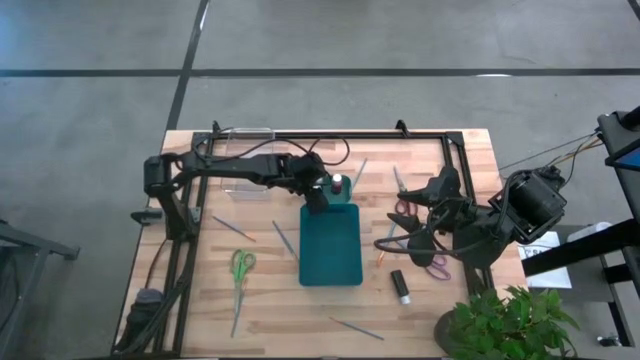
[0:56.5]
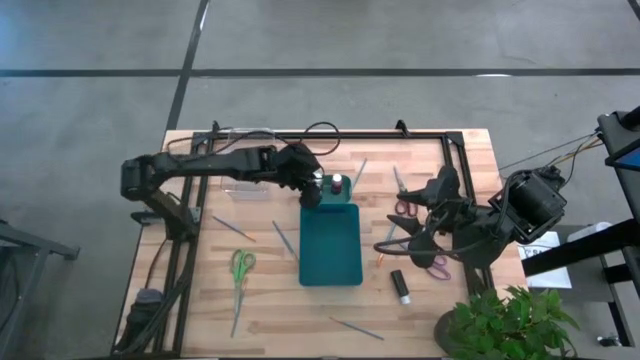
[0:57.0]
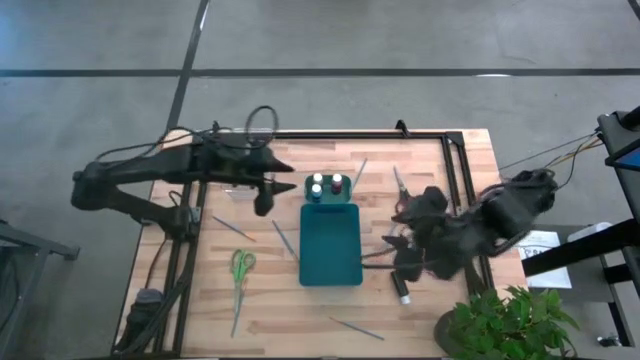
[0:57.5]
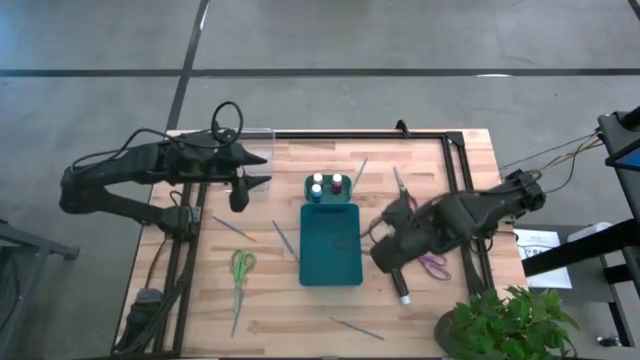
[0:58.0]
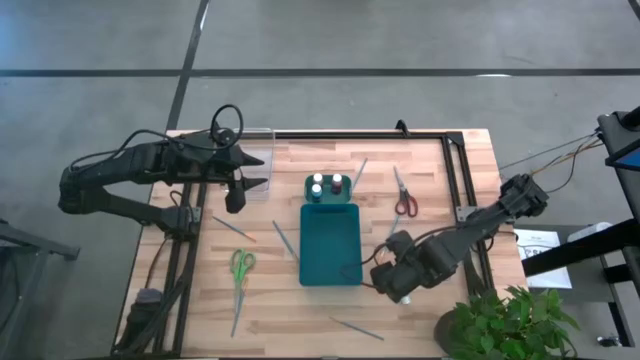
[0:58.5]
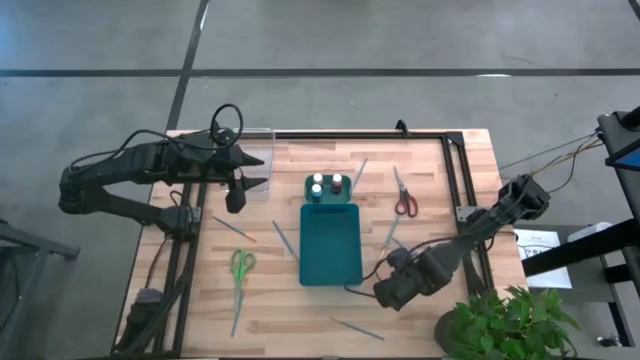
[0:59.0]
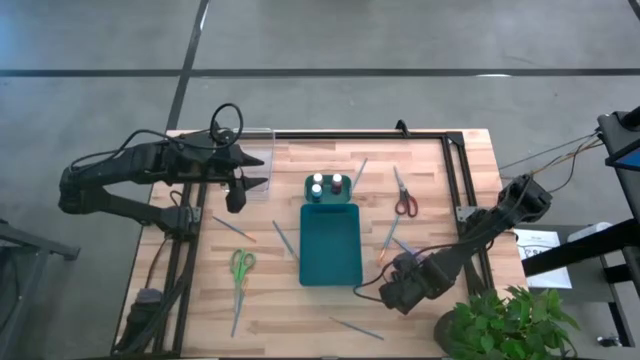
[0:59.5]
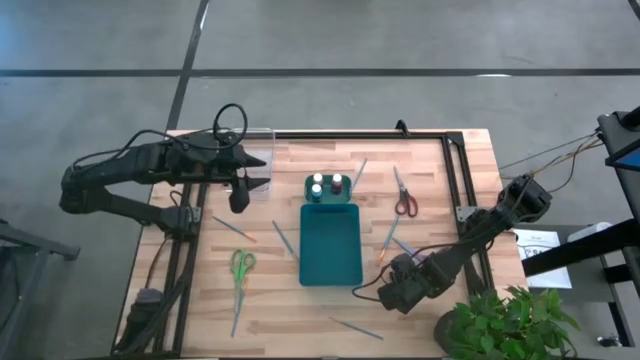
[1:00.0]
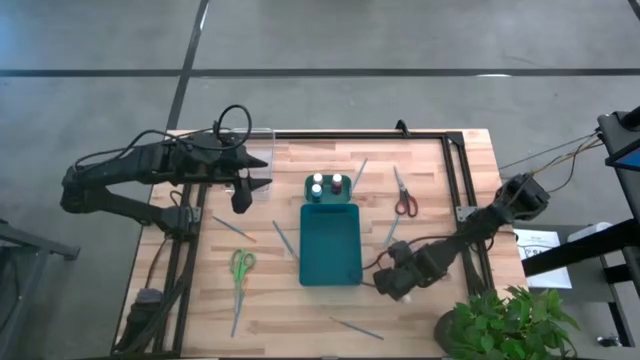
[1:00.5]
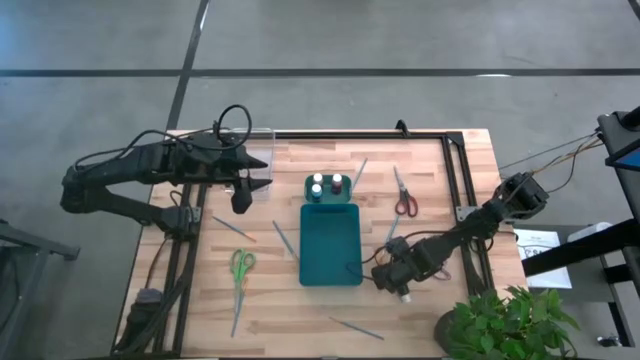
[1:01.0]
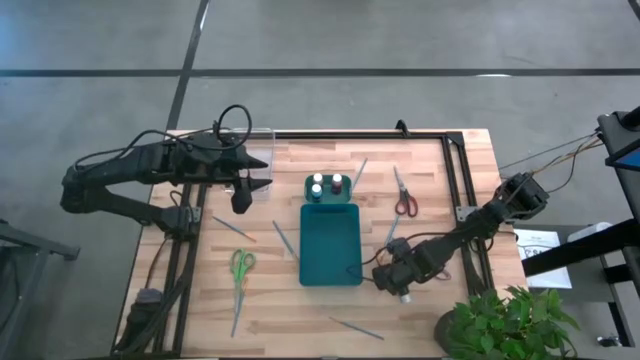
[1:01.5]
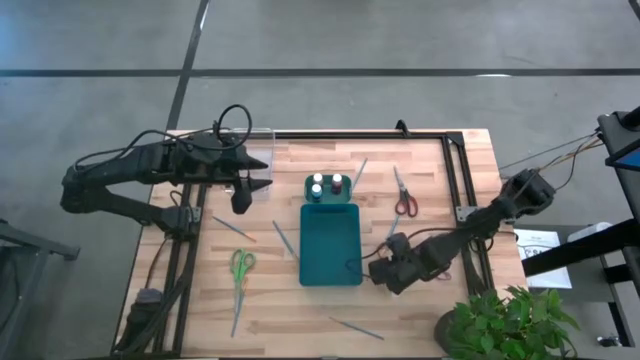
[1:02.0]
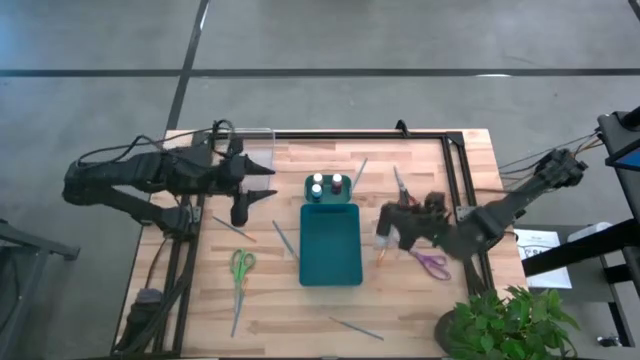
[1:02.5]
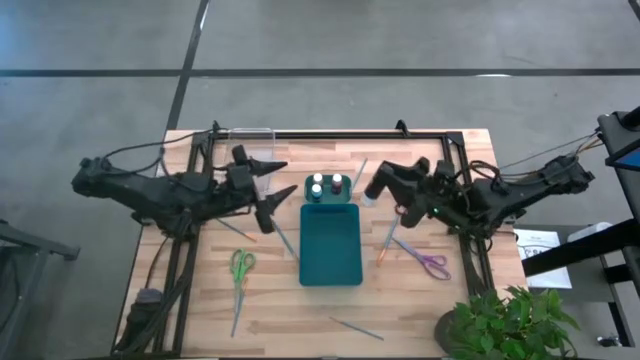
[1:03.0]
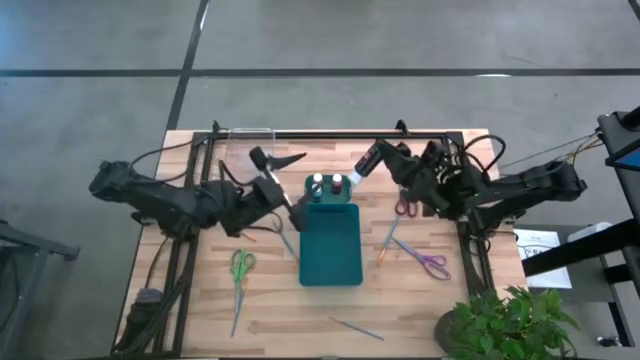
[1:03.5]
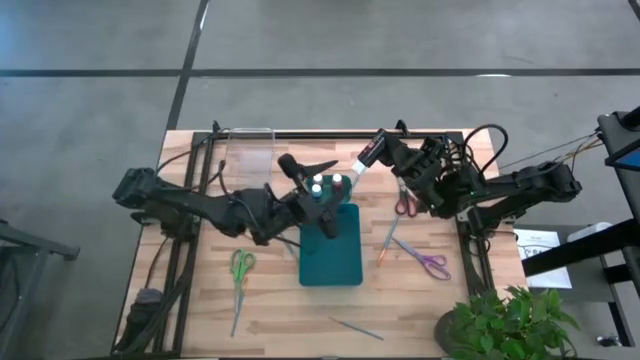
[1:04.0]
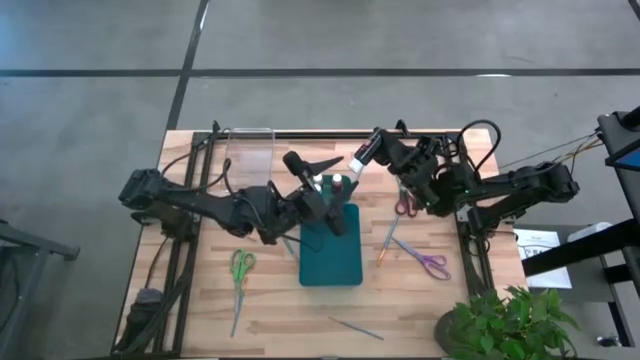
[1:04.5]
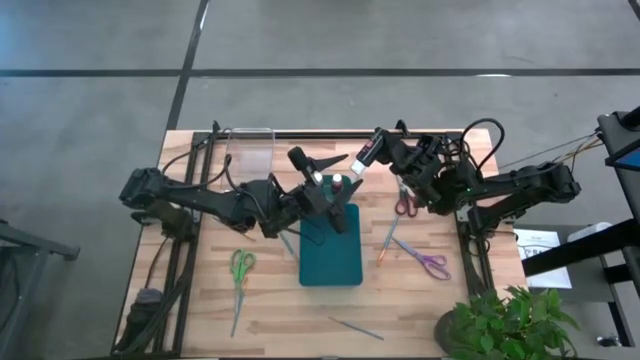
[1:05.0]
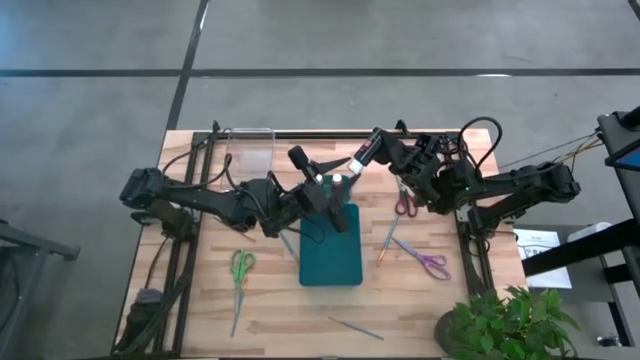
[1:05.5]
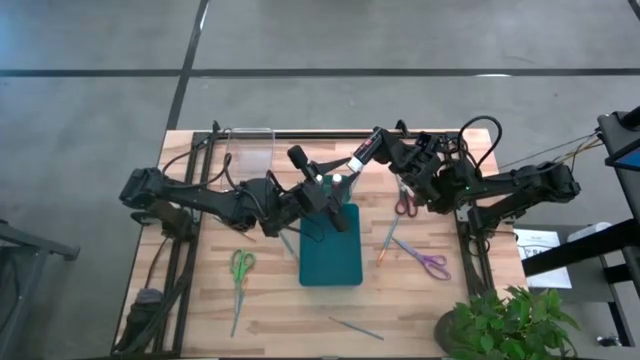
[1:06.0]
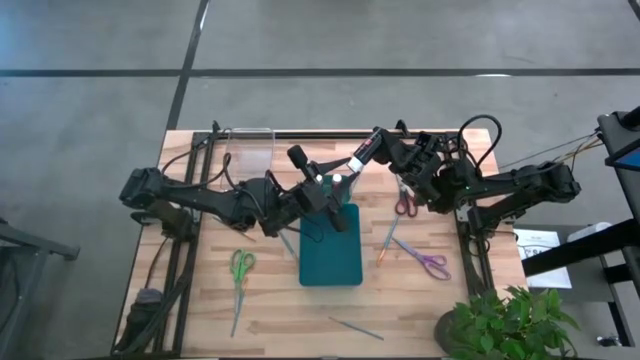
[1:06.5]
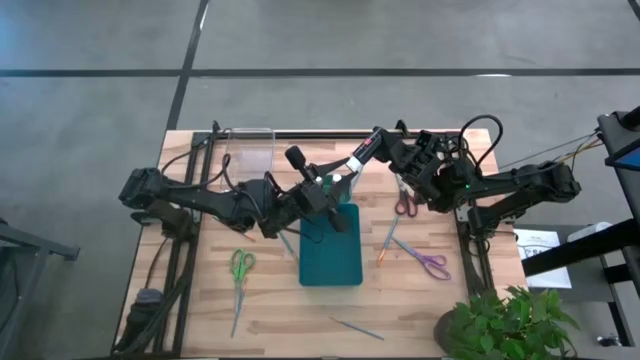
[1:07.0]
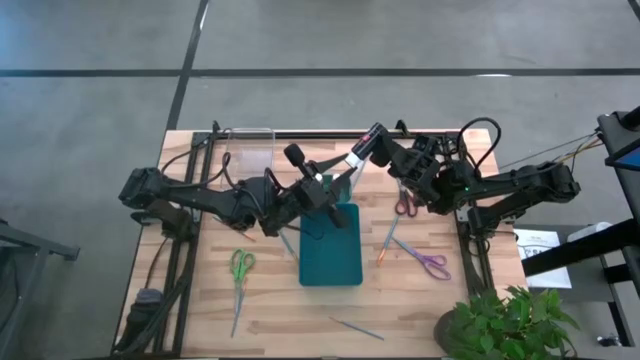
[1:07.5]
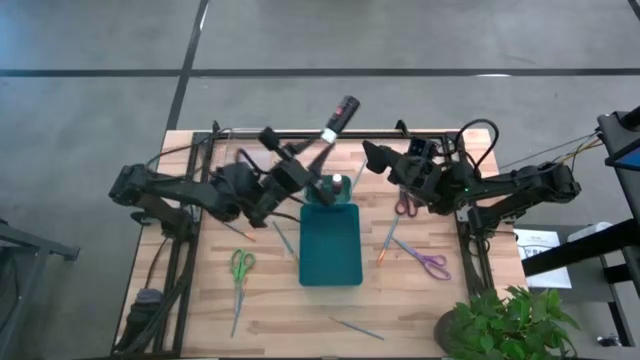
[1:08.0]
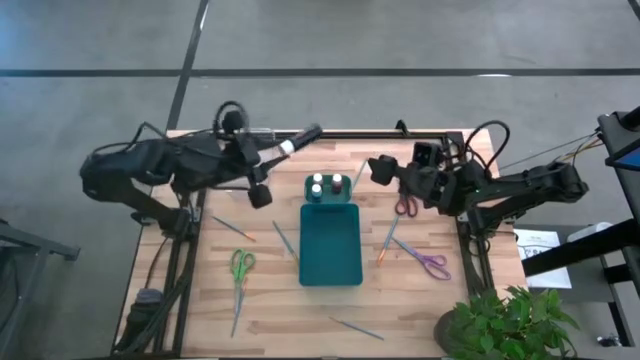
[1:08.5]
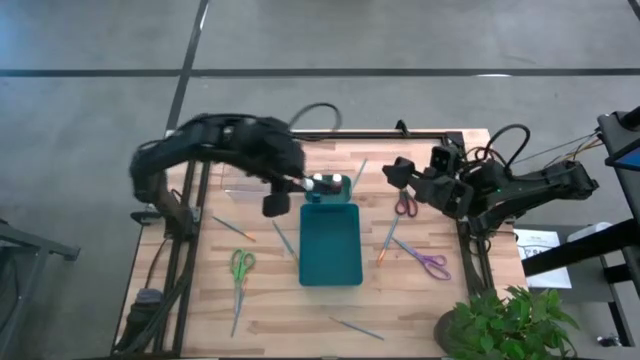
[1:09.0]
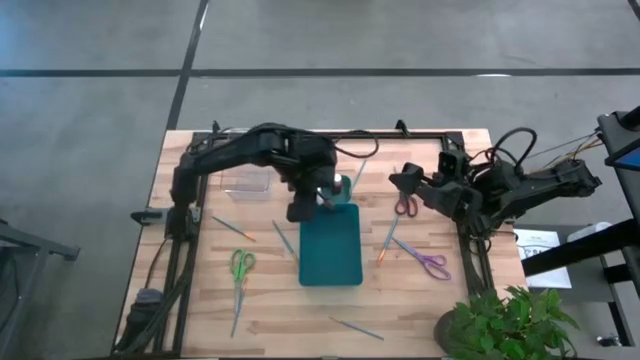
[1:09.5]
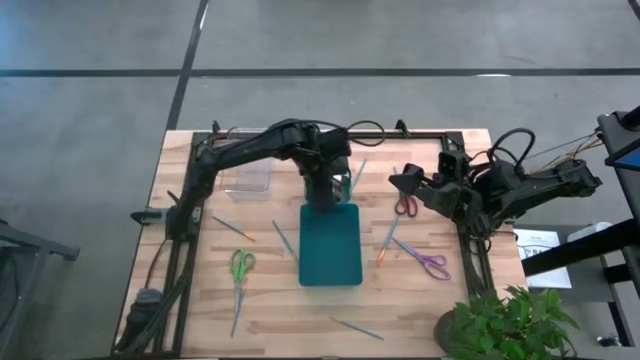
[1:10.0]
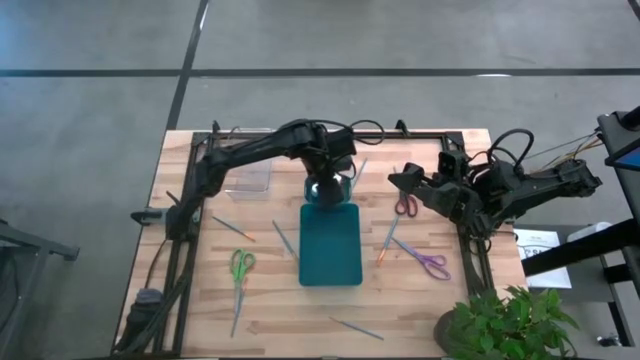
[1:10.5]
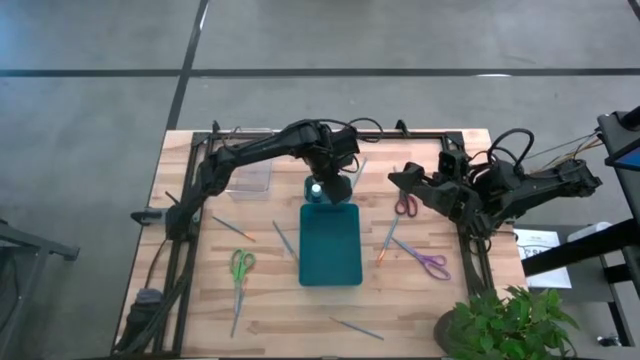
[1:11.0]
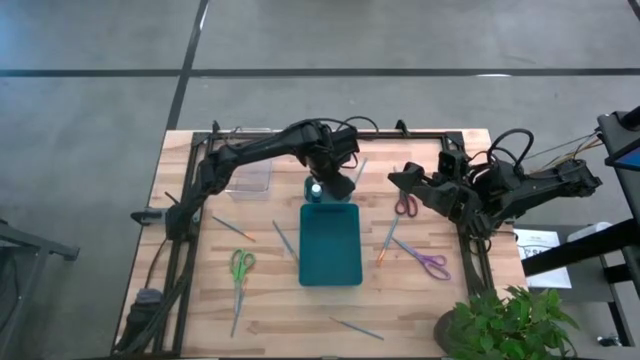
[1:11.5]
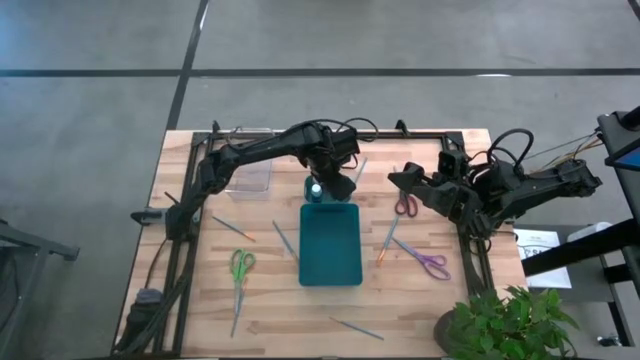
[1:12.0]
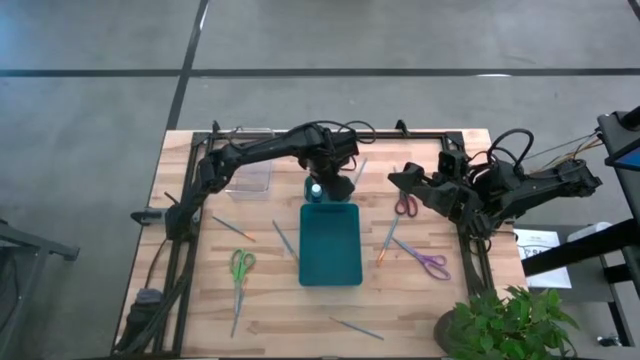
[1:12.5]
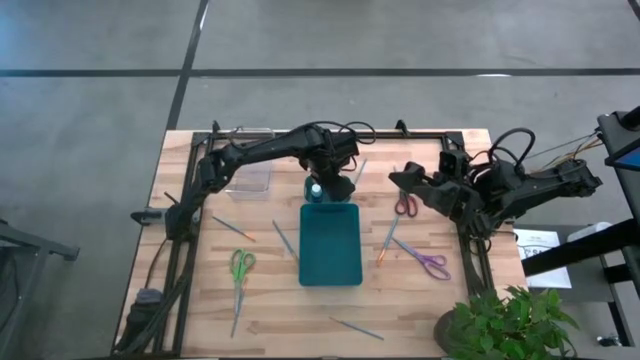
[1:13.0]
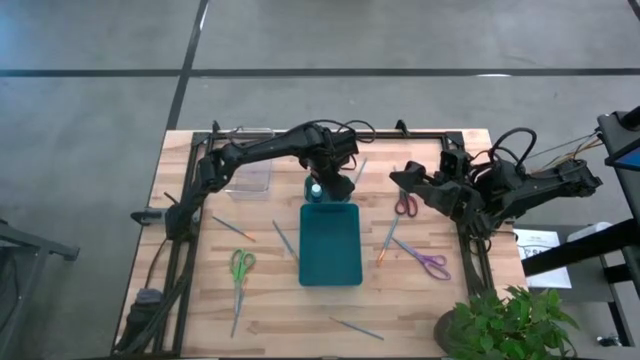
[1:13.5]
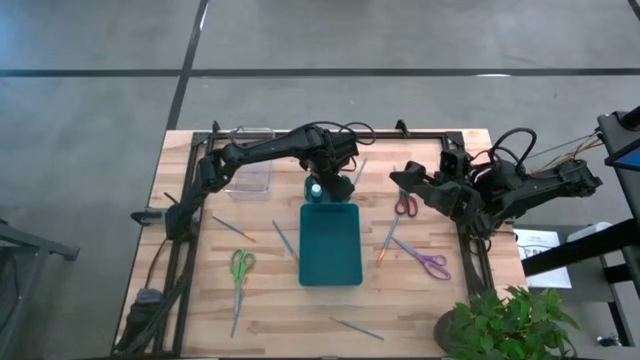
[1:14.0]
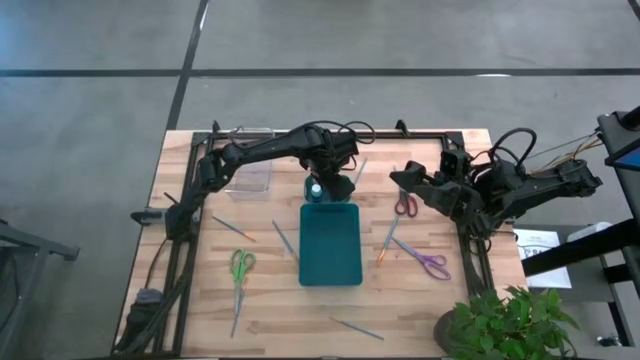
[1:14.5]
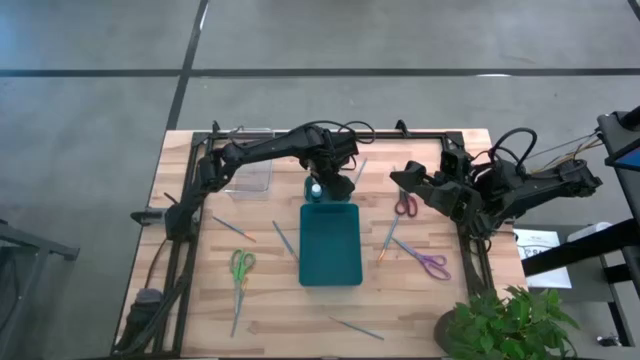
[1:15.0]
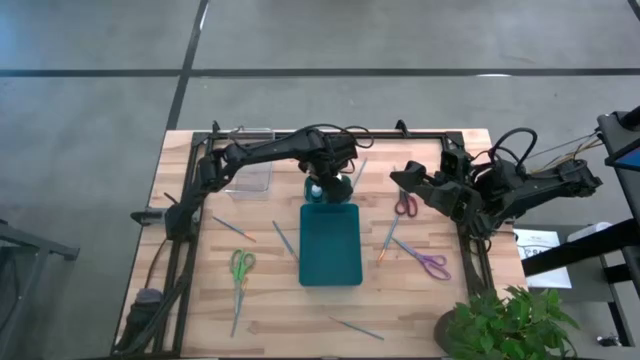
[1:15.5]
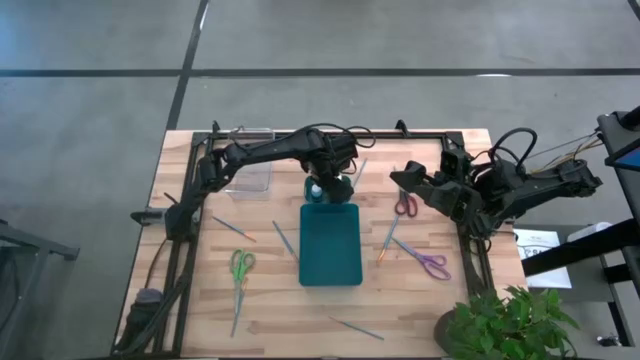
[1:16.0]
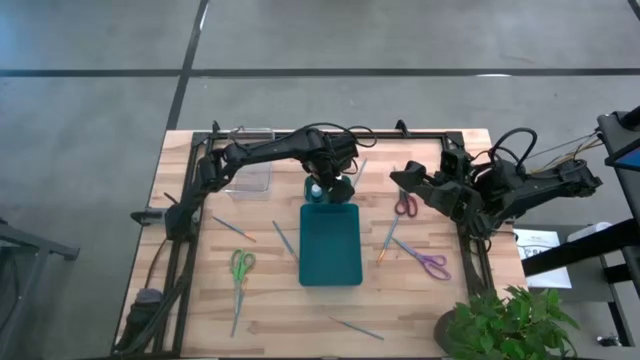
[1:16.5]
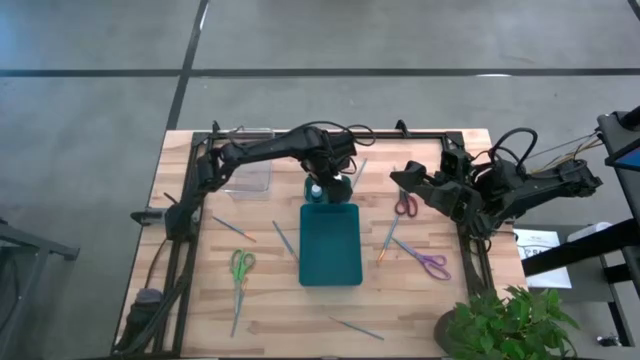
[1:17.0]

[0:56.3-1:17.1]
Task: Pick & Place Paint Supplies
Put the black paint bottle into the green bin
